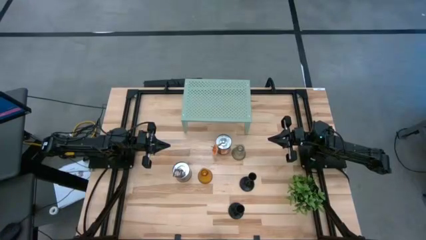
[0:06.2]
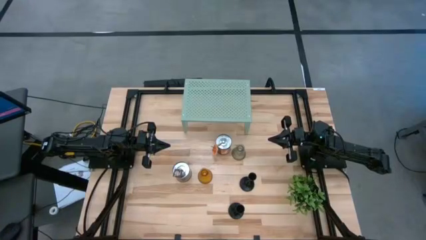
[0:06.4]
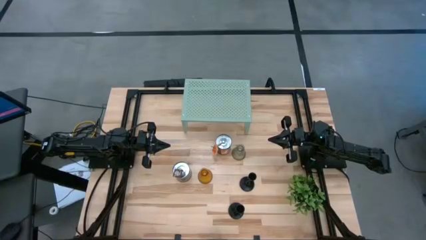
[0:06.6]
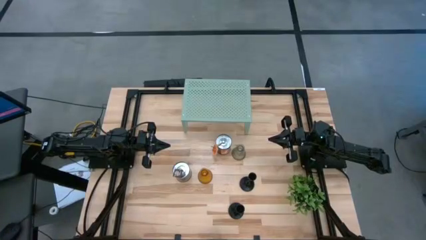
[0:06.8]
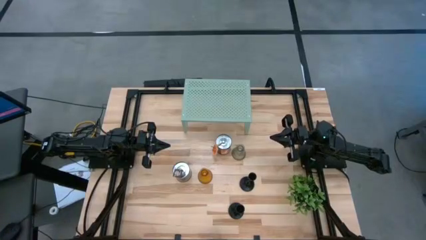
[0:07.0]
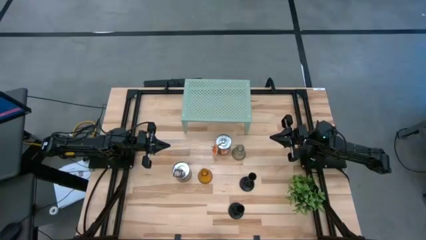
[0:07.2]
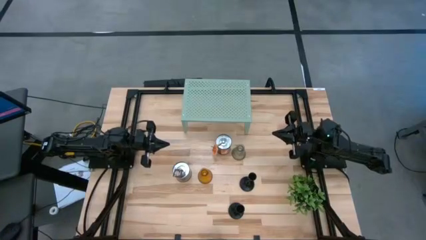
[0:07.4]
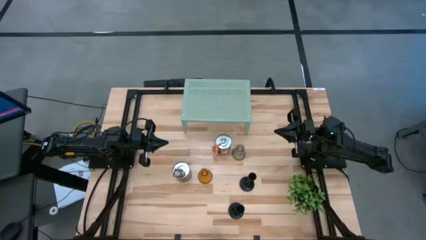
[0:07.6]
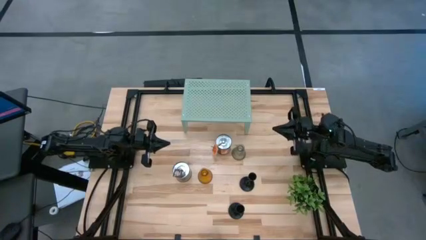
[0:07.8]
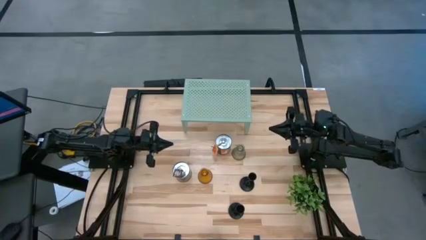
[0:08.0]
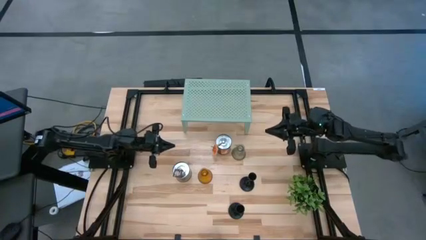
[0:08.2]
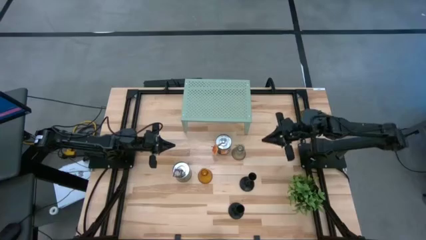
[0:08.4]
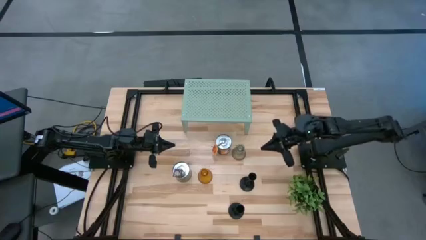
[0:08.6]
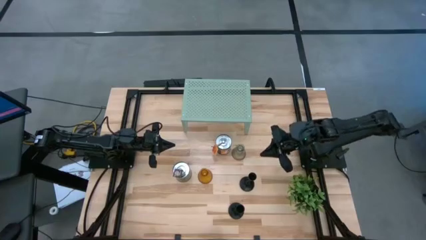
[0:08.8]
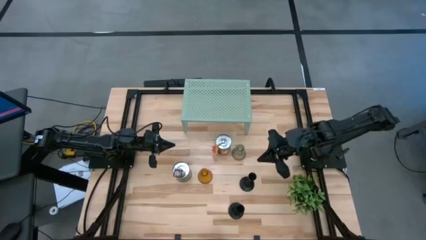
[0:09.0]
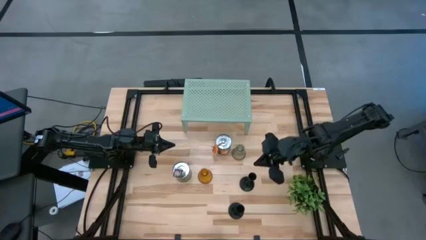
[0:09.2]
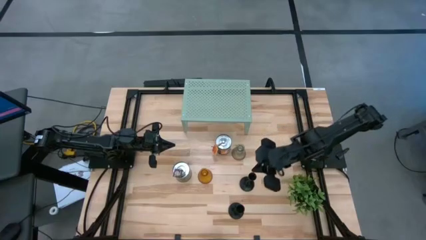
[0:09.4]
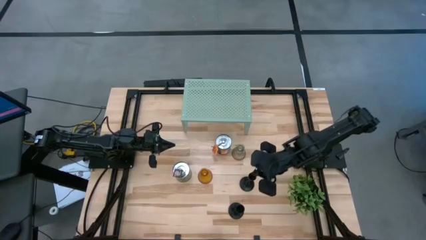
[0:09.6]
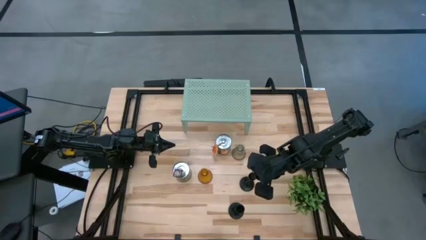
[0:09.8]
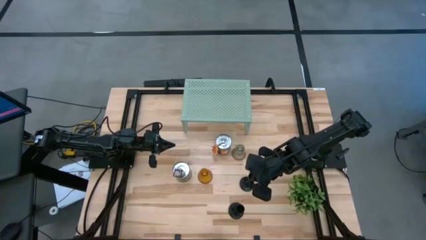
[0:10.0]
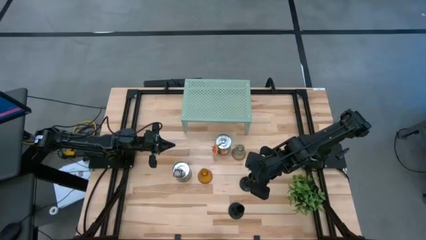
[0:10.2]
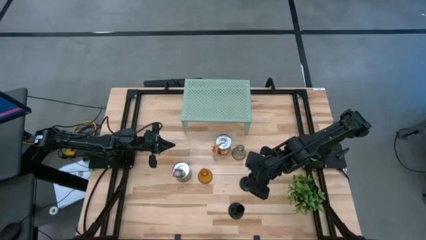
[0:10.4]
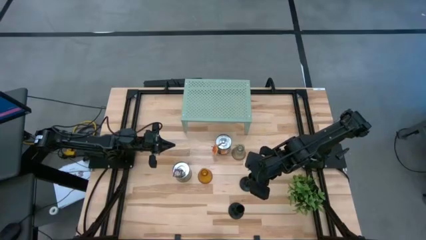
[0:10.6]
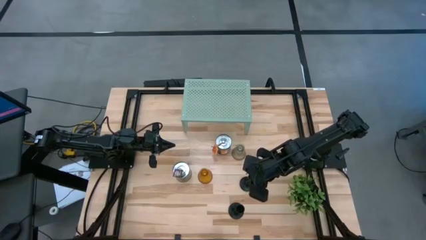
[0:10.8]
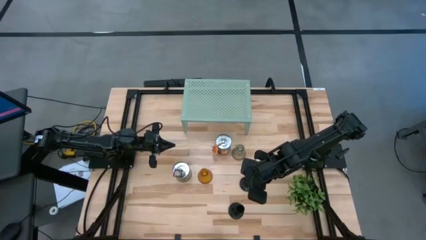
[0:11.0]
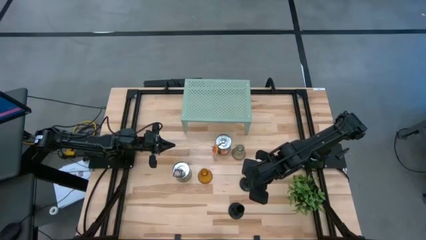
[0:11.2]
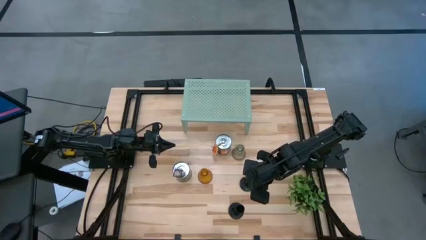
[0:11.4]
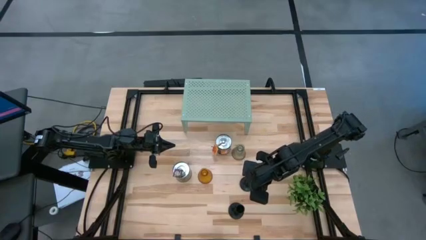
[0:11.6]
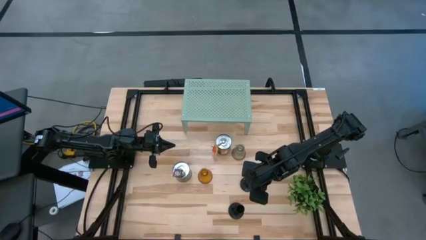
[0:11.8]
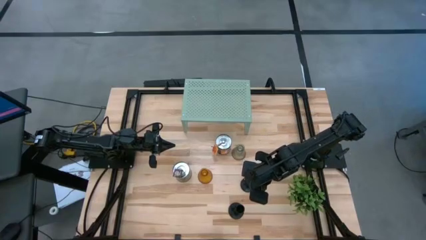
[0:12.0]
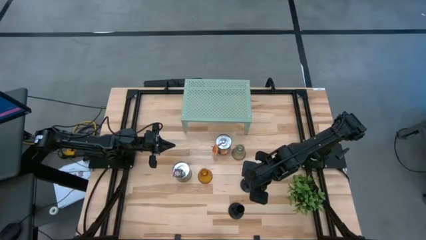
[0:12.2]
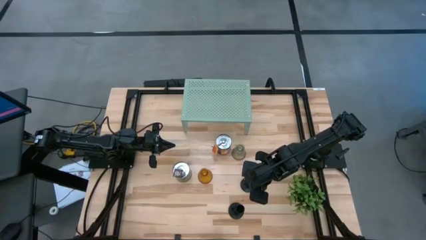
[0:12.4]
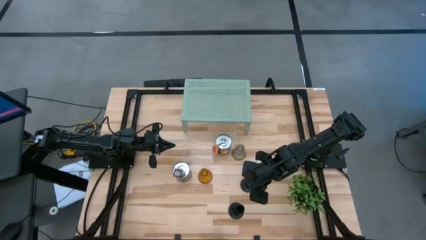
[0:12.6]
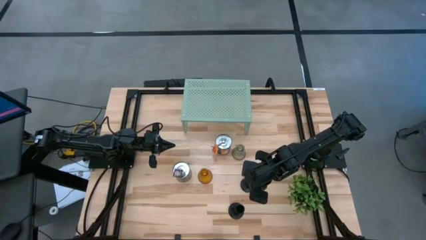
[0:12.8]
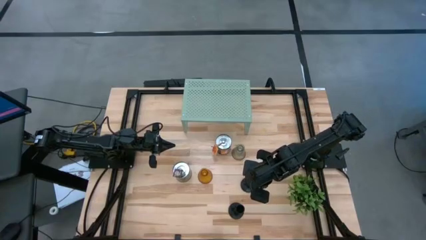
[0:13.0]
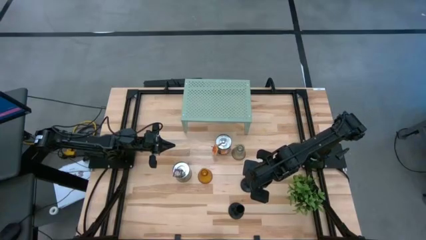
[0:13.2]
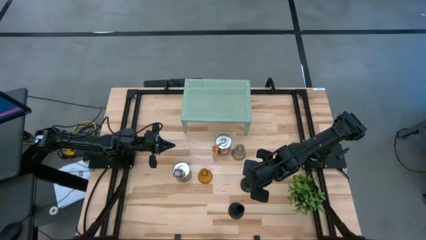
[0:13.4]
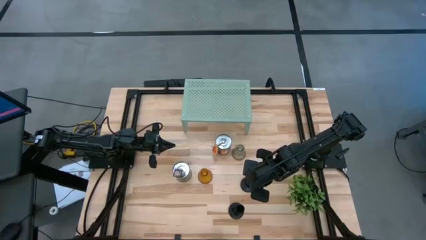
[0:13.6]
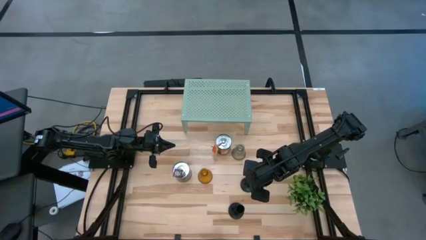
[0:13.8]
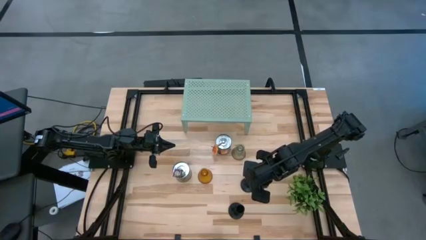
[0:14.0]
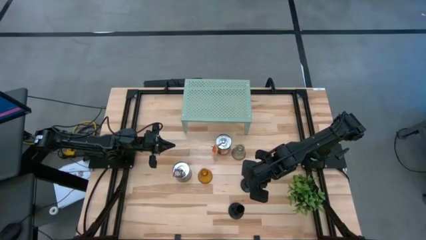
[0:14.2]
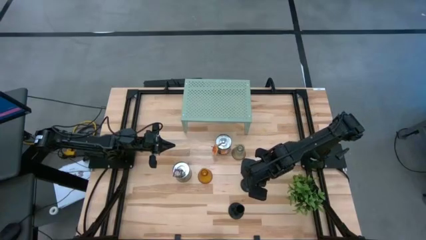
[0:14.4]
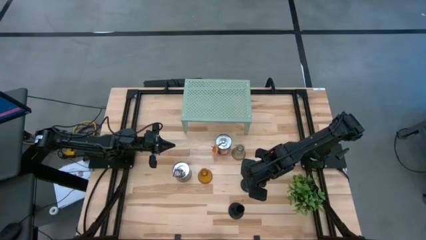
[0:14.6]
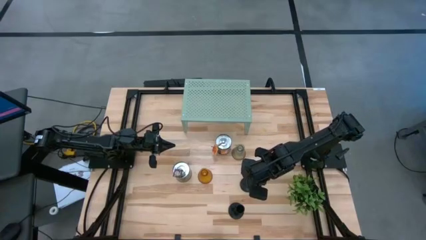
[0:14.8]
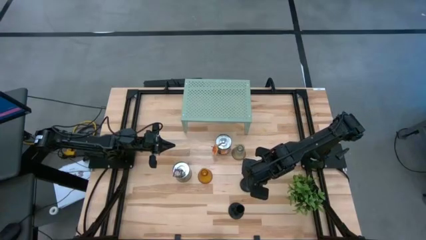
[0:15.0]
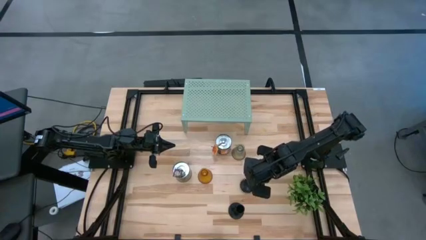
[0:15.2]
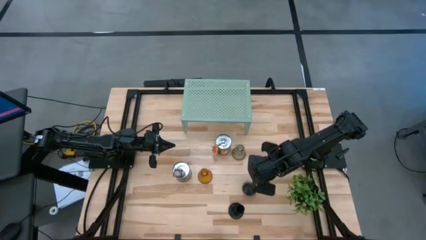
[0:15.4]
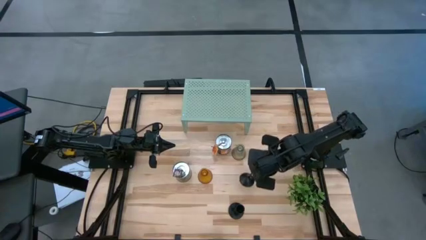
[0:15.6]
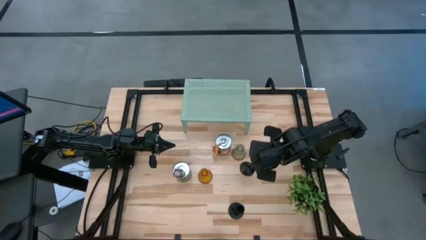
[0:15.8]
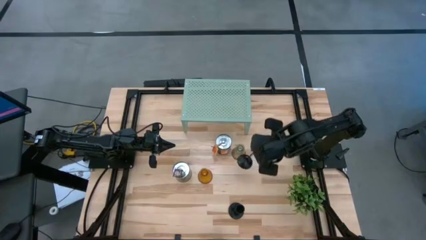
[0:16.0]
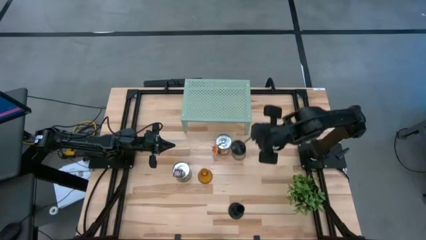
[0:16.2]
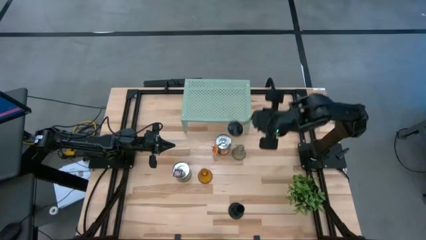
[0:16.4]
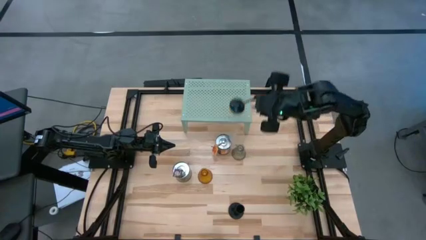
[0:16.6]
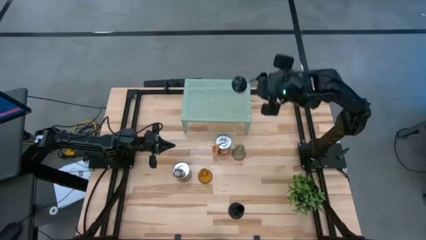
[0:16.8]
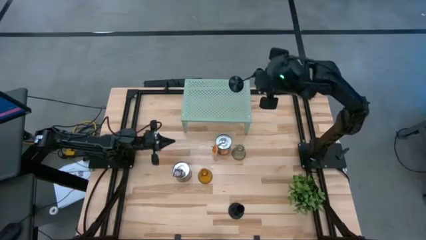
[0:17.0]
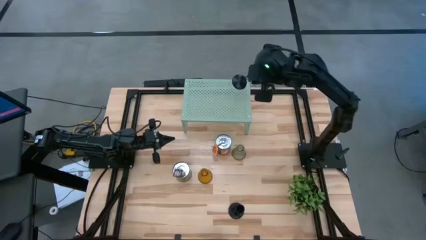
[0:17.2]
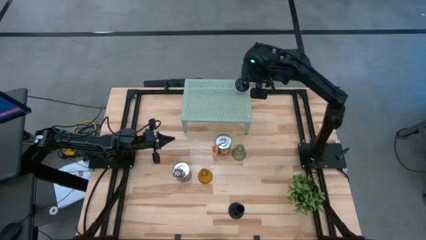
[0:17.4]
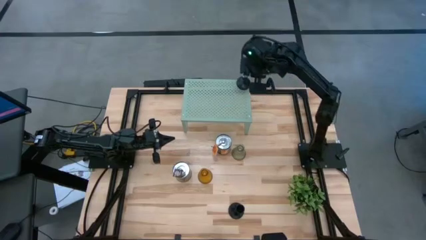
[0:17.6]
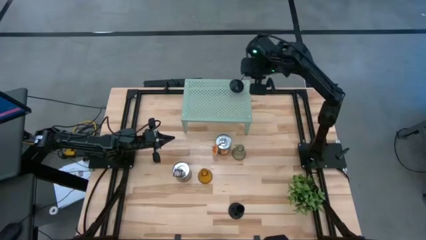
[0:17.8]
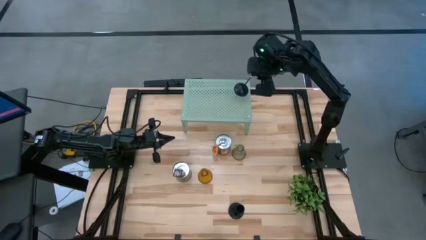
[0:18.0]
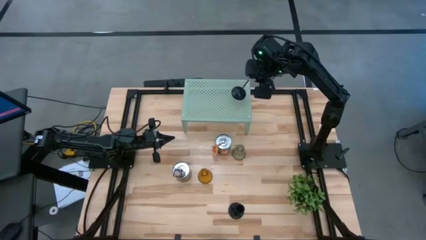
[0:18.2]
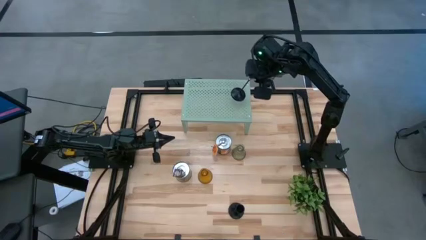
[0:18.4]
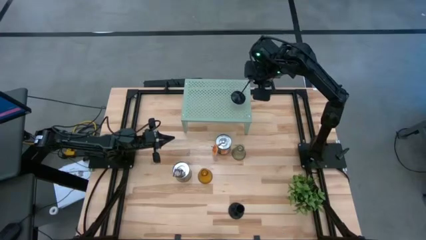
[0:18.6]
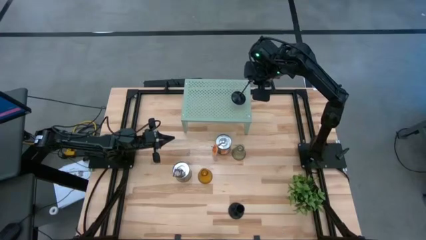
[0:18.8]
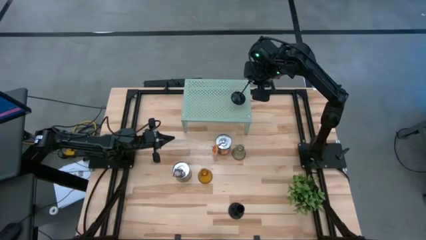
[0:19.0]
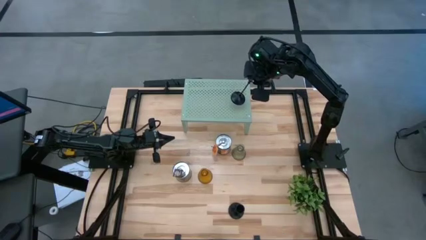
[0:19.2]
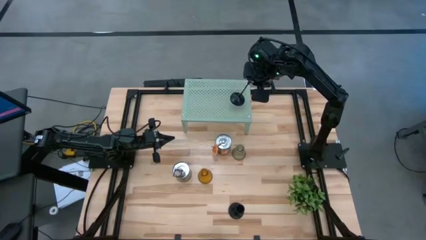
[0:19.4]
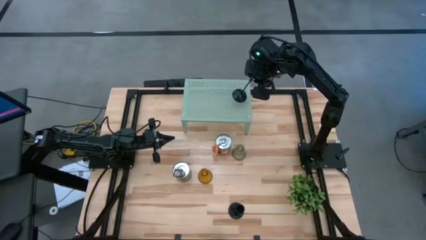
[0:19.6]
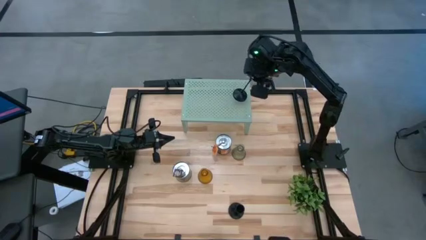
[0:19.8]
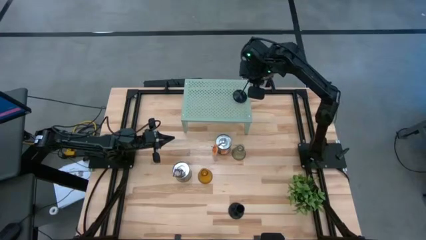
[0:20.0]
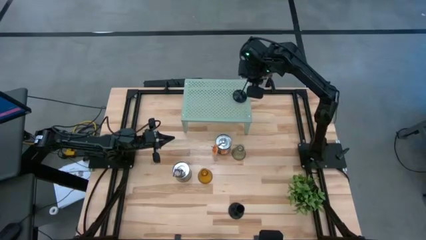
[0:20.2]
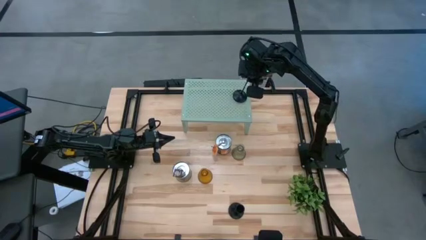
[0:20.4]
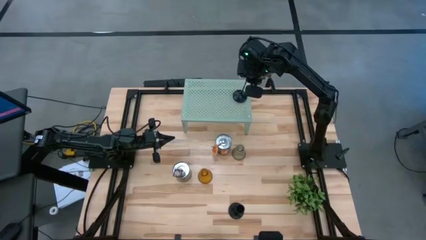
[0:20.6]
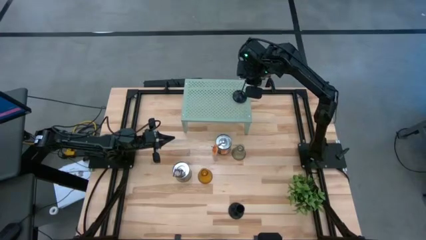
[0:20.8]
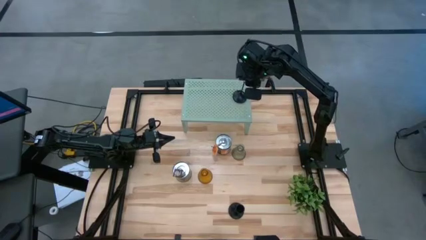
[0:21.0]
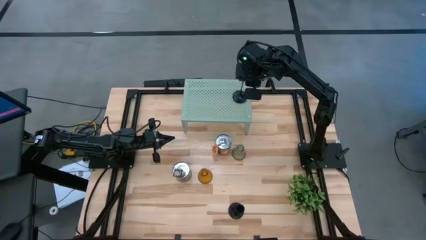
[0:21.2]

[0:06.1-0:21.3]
Task: Pick & Place candle stick holders
Put the top black candle holder on the shelf
